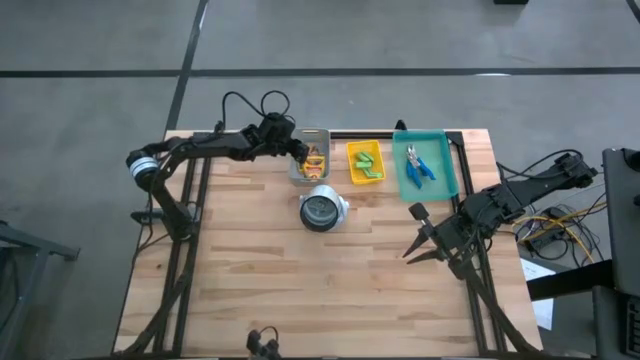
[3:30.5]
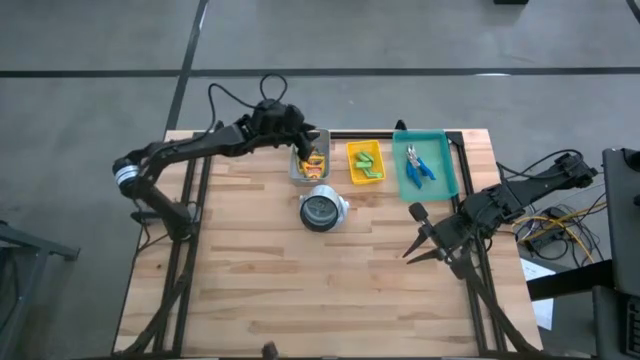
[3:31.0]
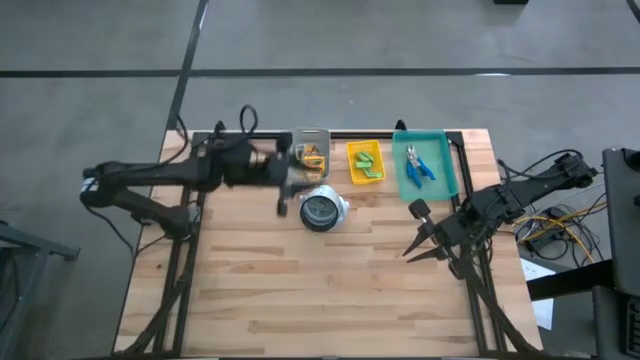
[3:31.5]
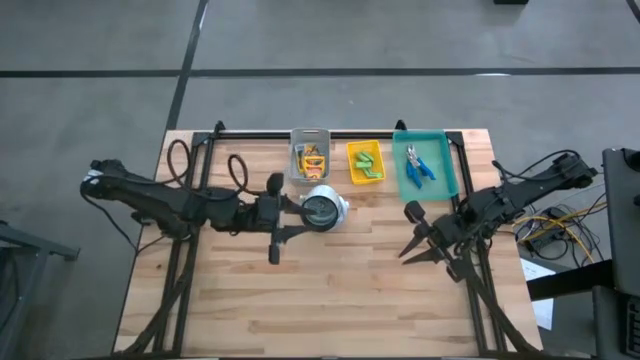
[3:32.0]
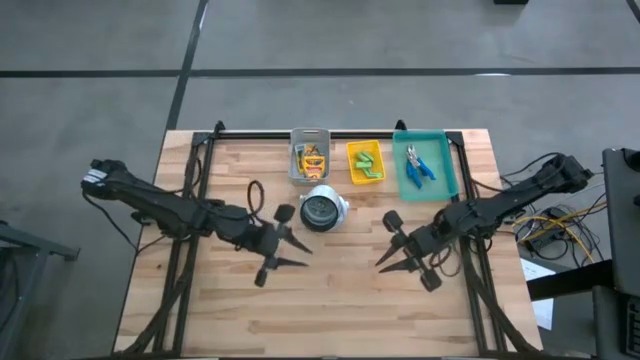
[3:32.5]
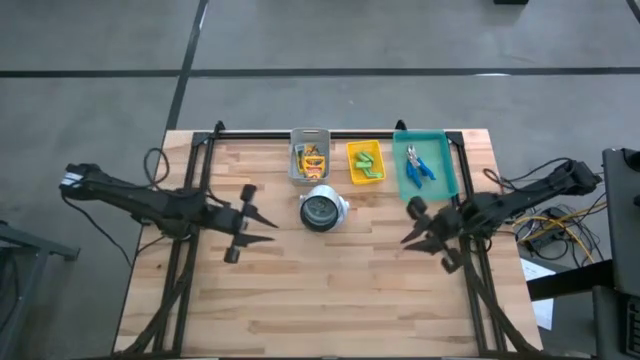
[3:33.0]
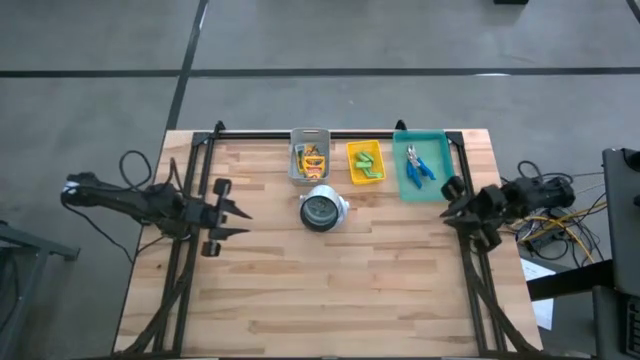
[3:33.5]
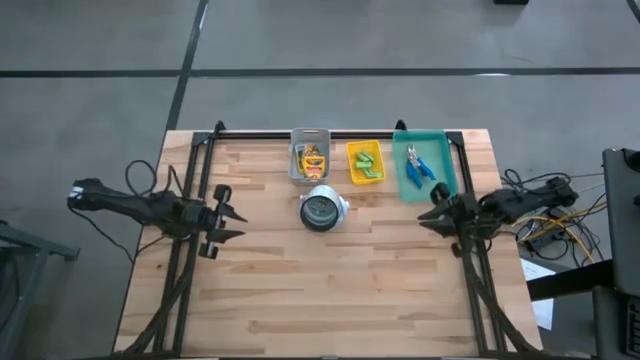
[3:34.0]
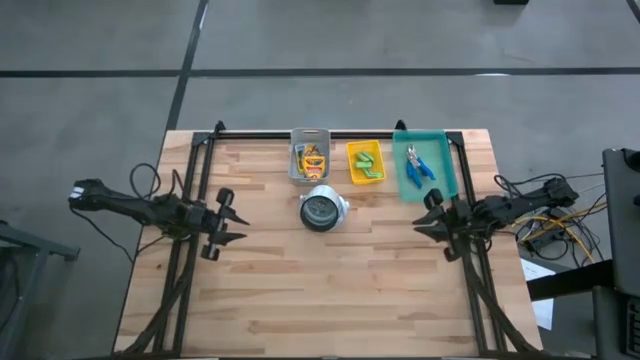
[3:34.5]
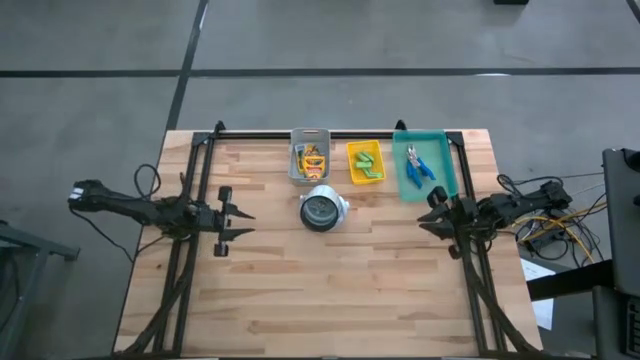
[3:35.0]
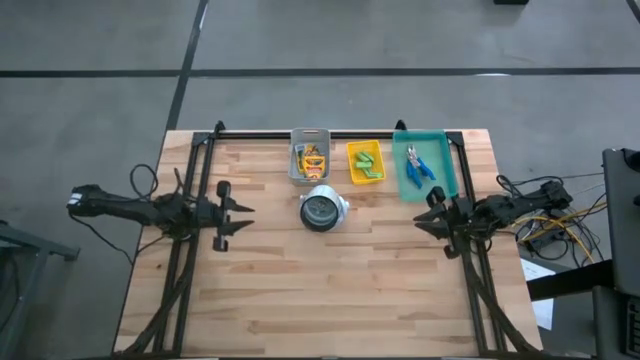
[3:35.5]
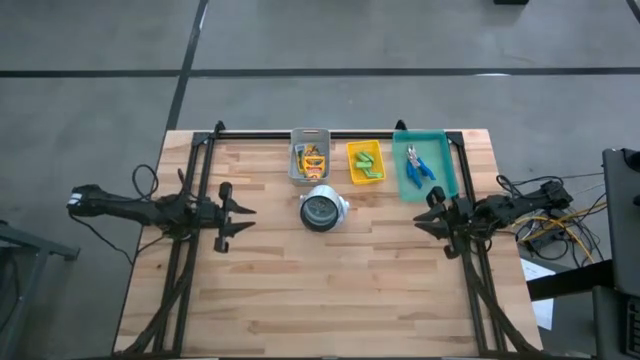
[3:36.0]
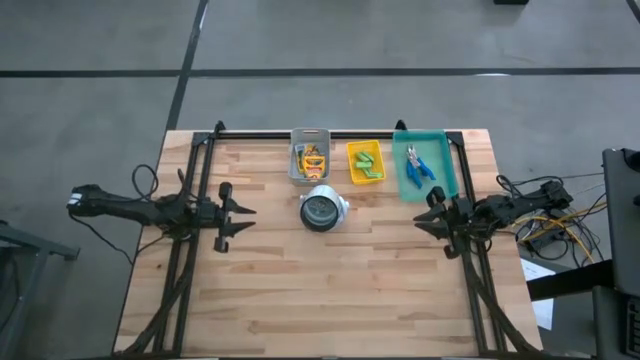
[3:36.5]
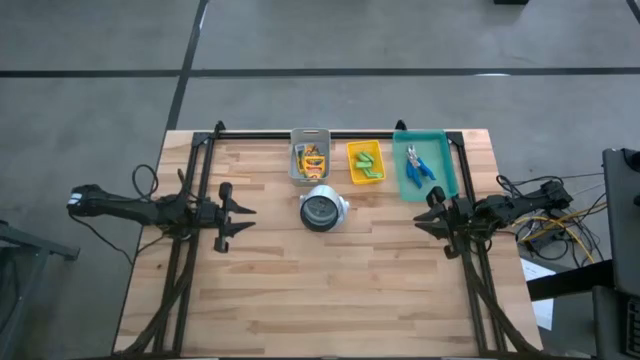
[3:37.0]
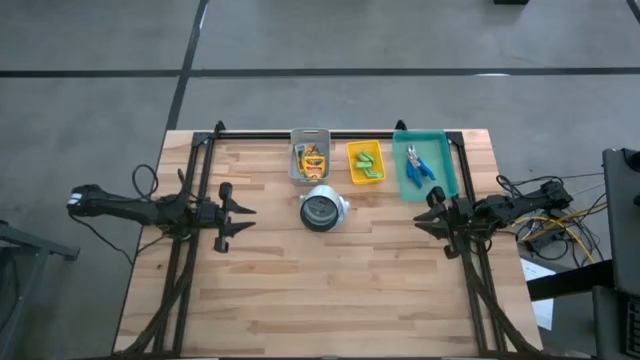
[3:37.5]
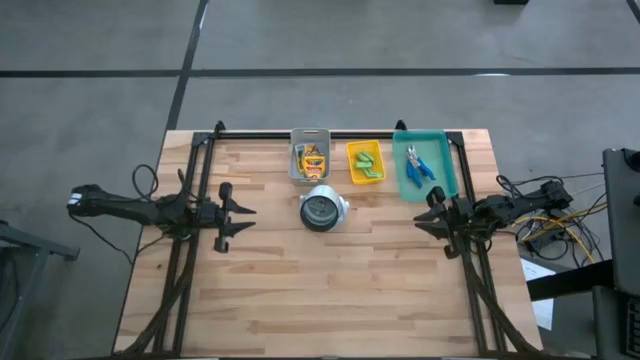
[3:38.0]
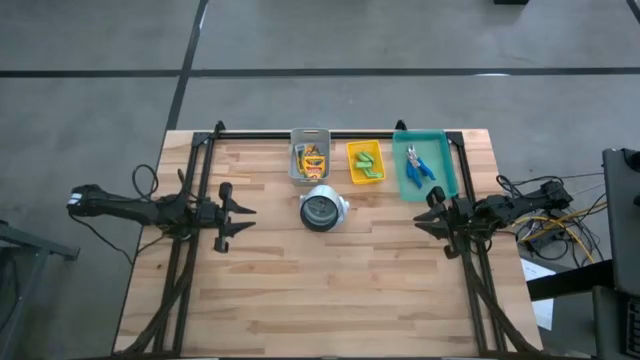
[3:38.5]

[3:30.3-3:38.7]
Task: Pick & Place School Supplies
Return to Home Position

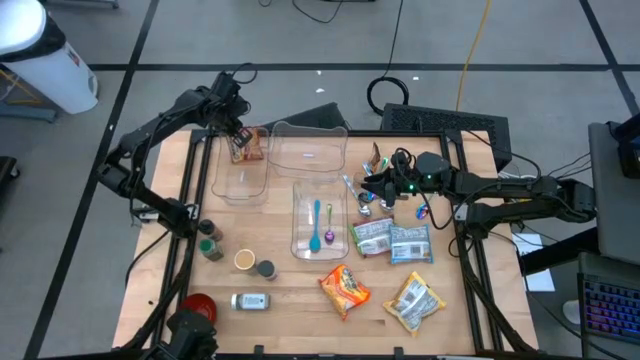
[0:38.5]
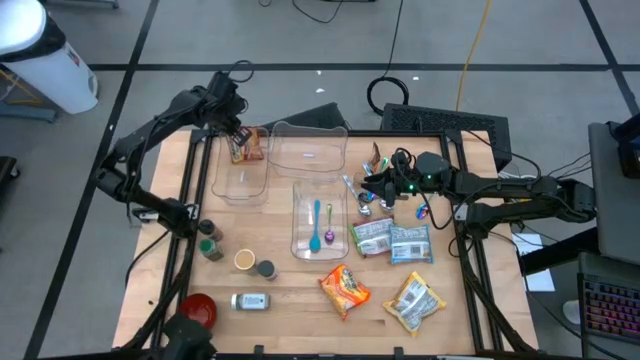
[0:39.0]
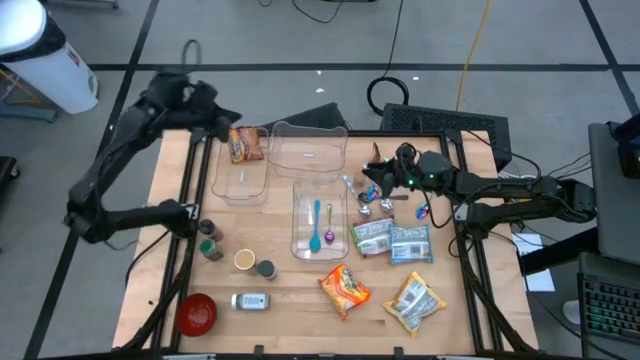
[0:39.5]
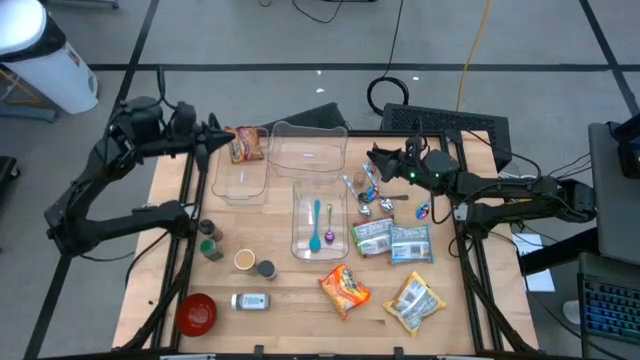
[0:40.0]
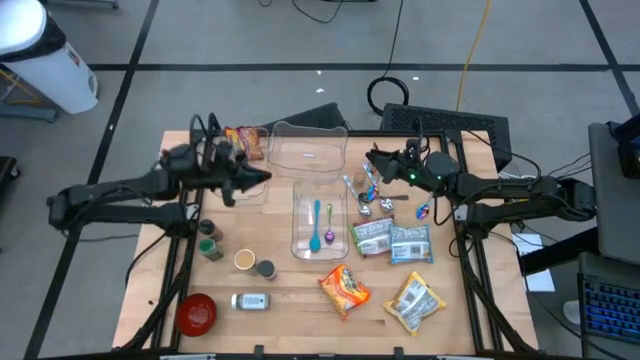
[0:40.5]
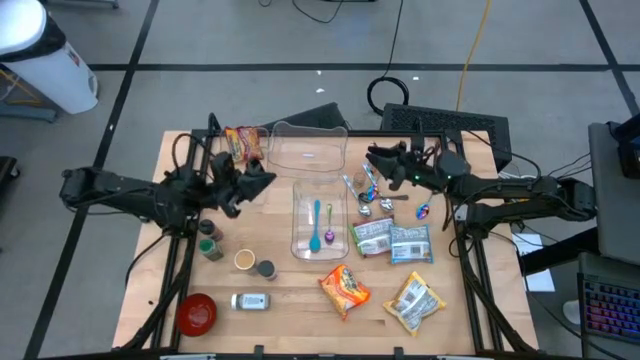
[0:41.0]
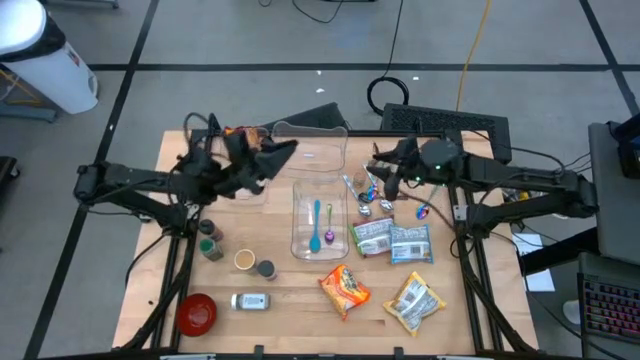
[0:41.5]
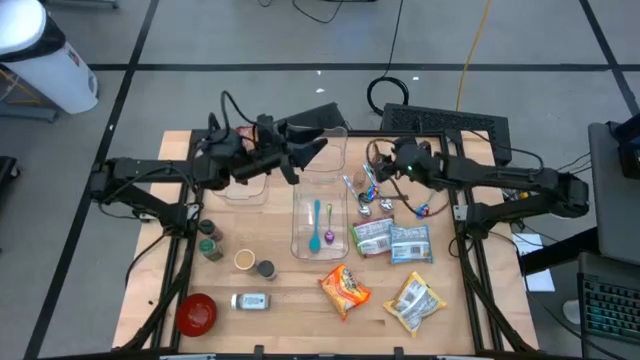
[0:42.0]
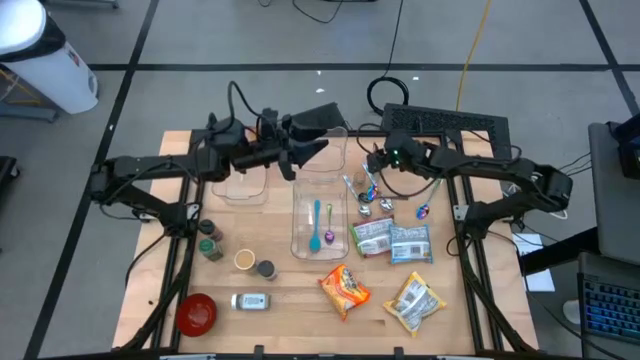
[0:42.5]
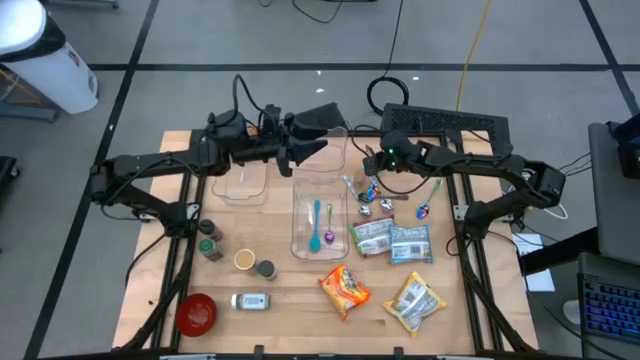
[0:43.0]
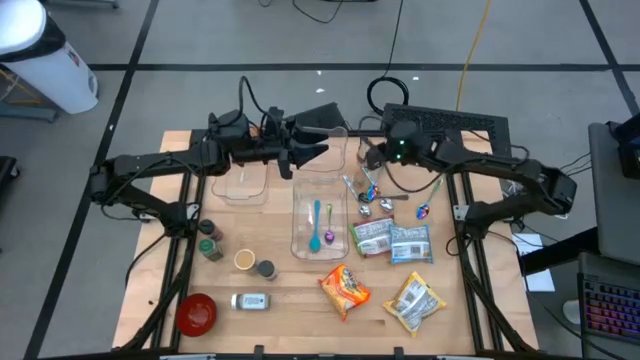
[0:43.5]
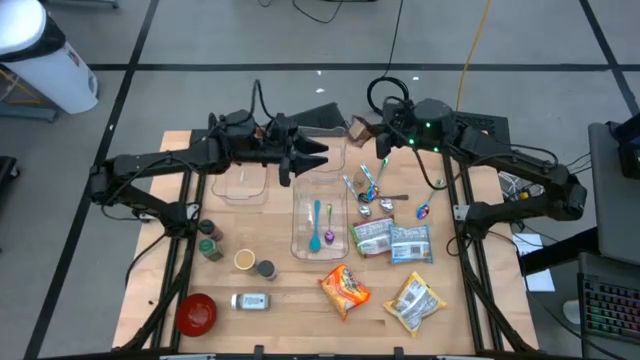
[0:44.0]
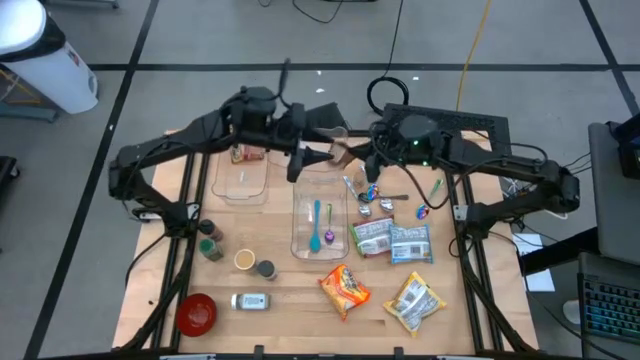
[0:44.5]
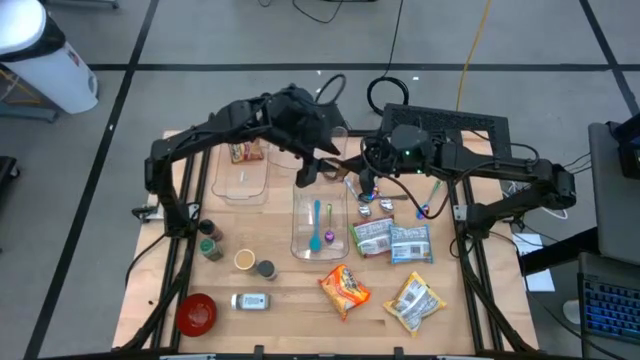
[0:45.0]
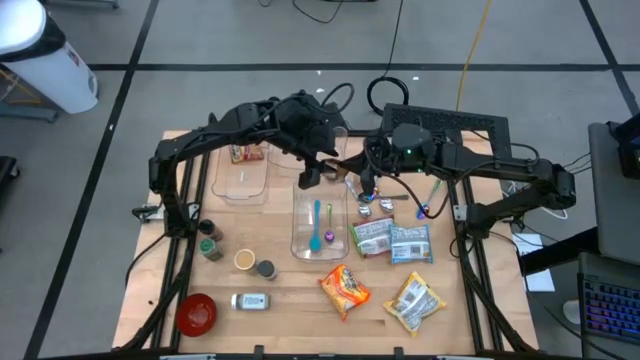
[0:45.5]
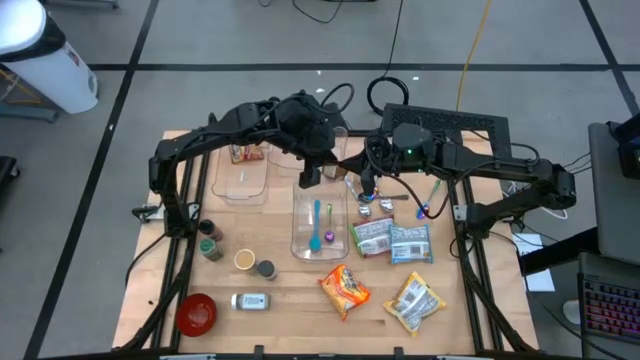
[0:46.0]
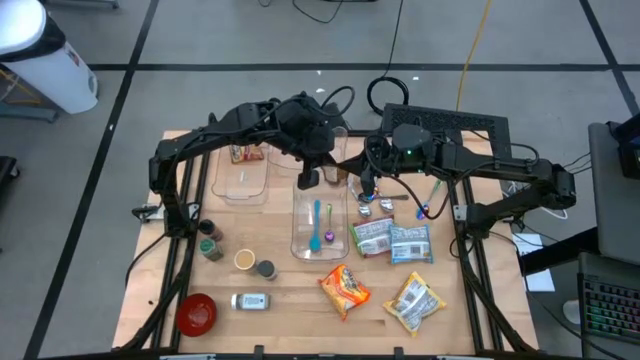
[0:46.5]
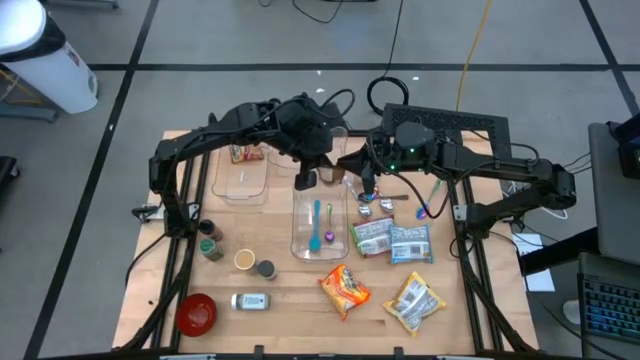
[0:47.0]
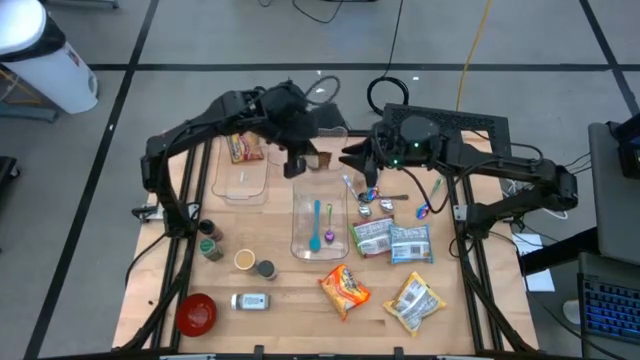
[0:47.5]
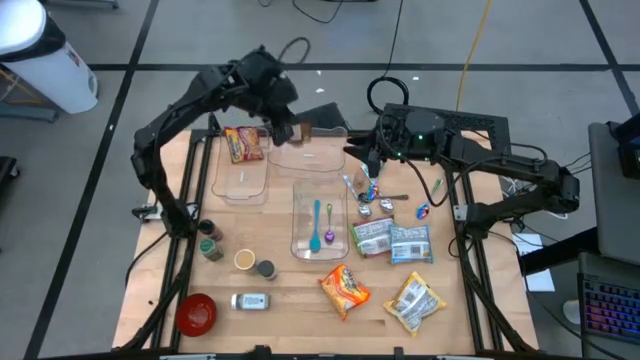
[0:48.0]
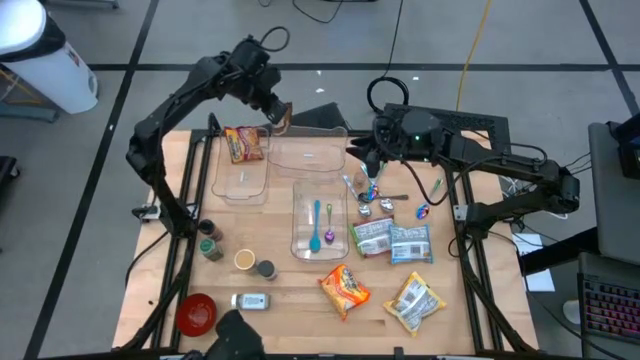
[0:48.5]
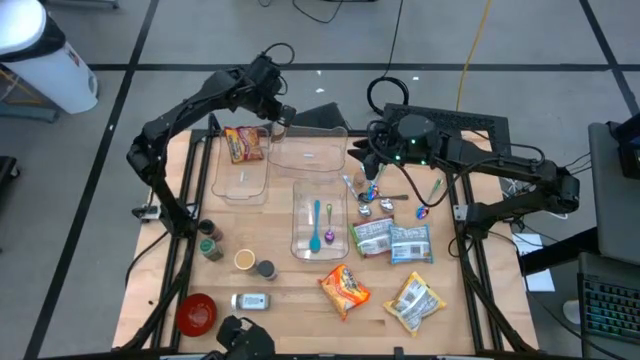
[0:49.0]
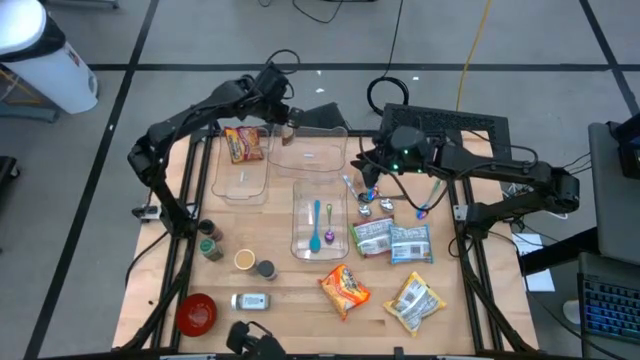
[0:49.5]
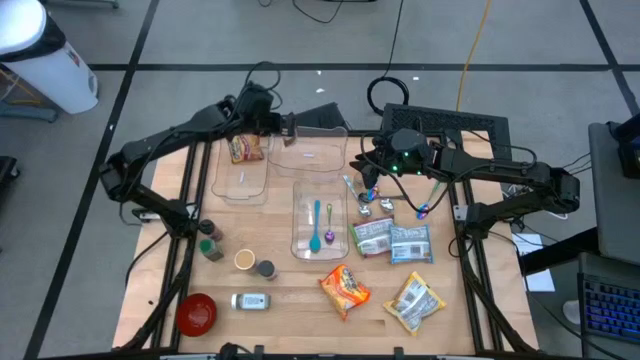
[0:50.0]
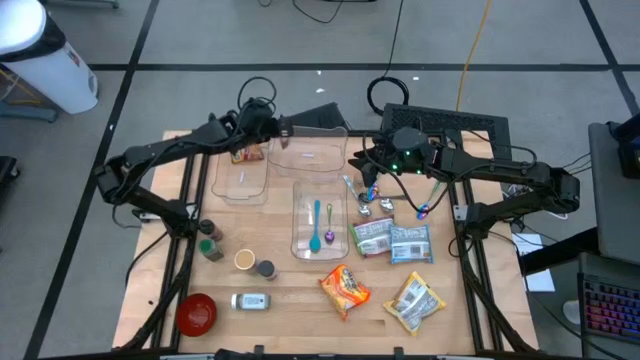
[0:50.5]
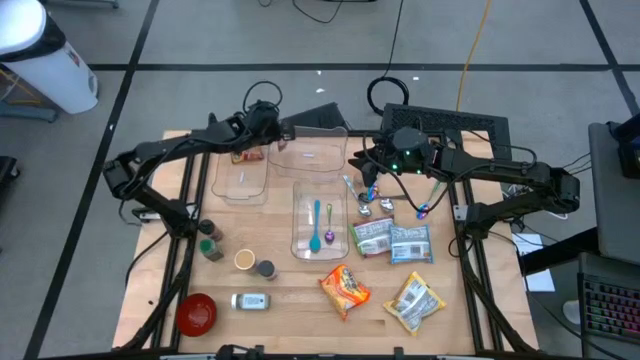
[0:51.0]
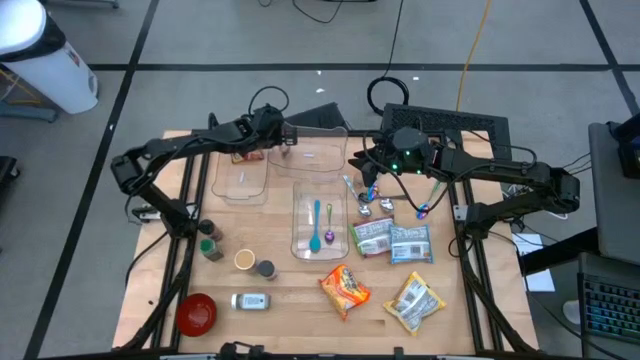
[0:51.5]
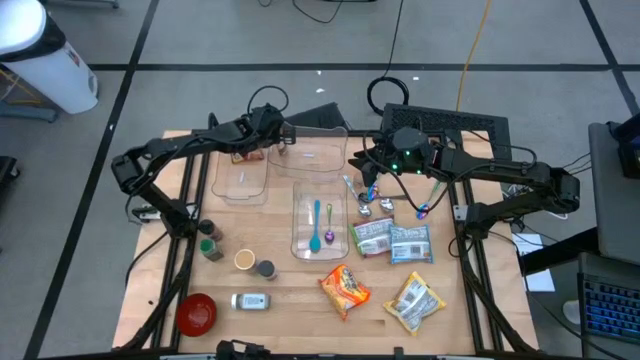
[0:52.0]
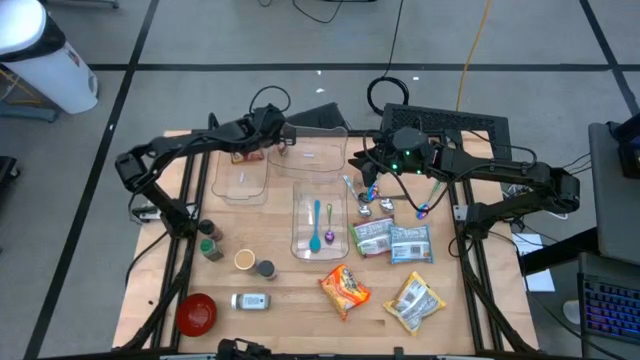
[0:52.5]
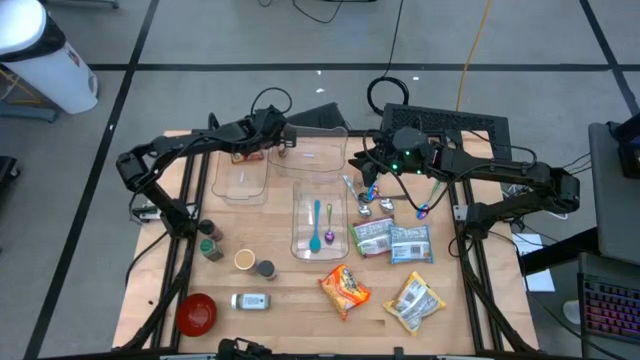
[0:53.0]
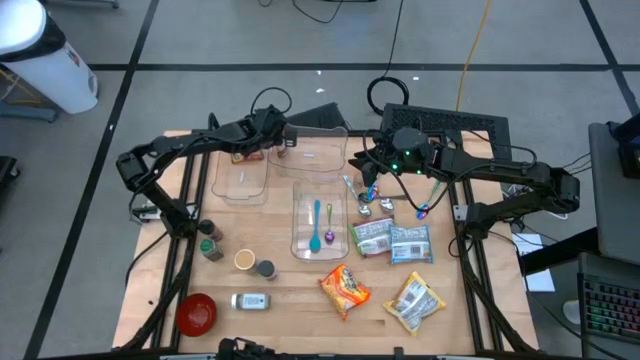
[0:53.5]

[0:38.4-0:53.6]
Task: Pick & Place Food Item
Put the brown seasoning pack into the top right transparent bin
